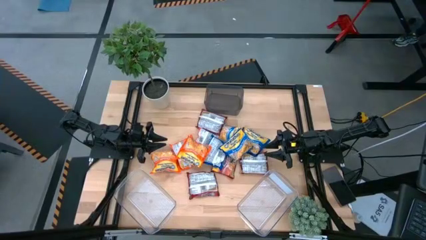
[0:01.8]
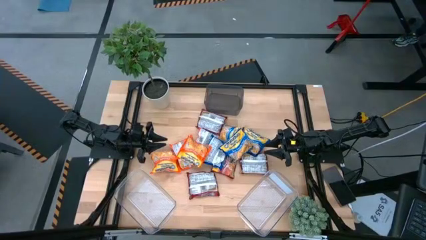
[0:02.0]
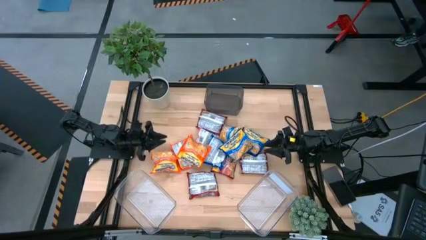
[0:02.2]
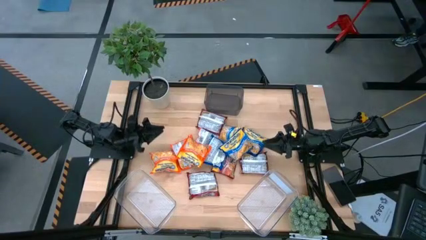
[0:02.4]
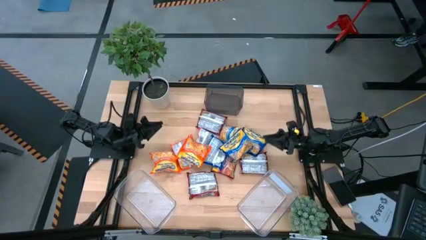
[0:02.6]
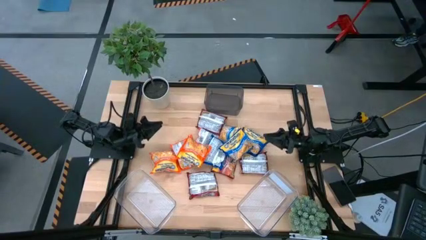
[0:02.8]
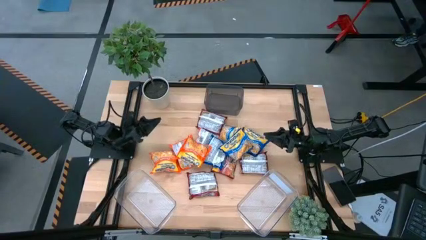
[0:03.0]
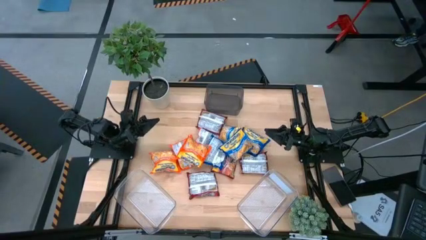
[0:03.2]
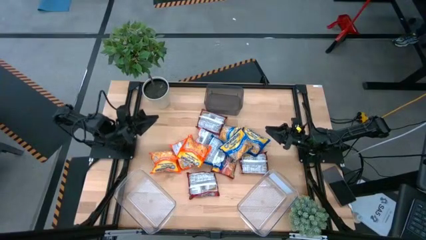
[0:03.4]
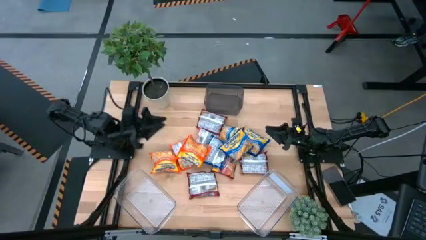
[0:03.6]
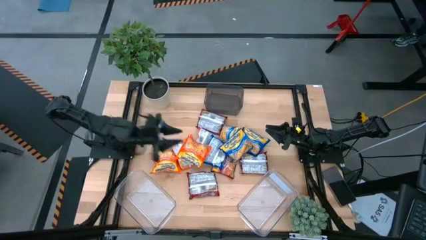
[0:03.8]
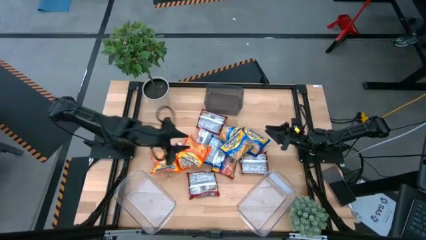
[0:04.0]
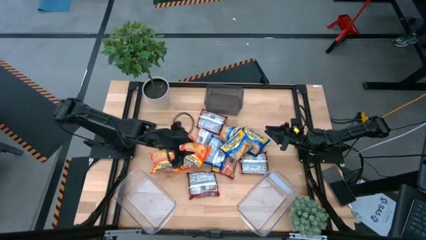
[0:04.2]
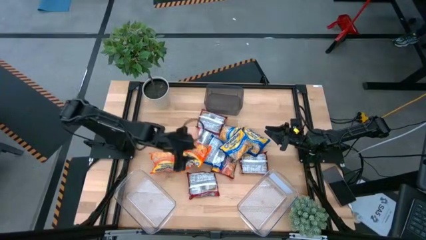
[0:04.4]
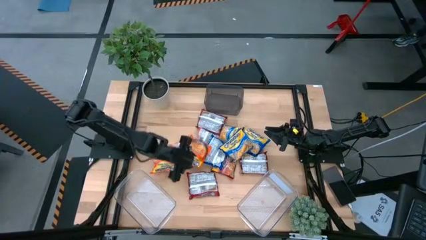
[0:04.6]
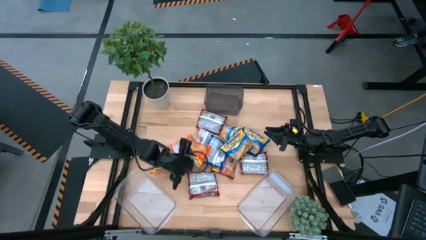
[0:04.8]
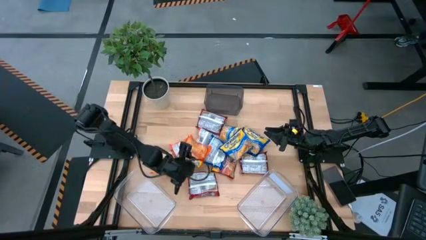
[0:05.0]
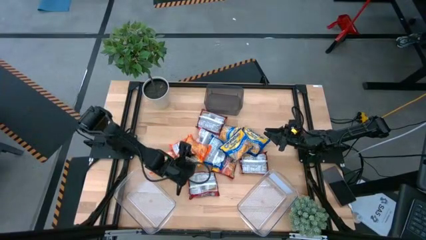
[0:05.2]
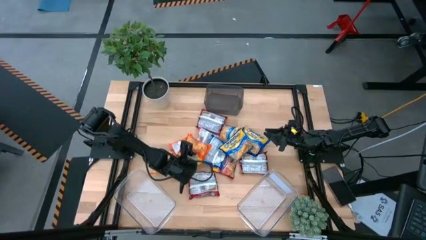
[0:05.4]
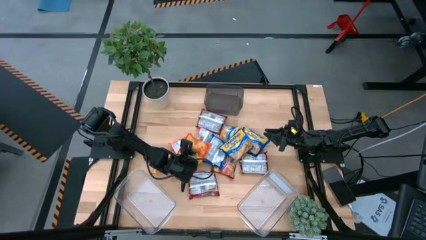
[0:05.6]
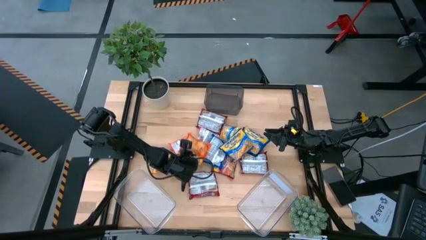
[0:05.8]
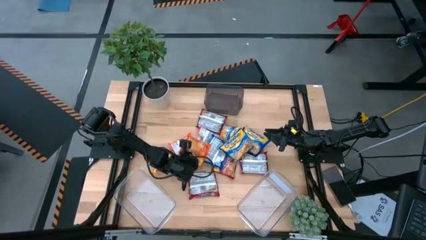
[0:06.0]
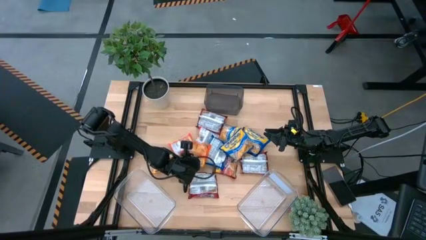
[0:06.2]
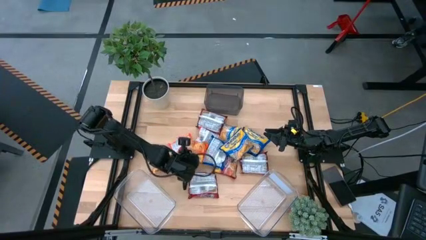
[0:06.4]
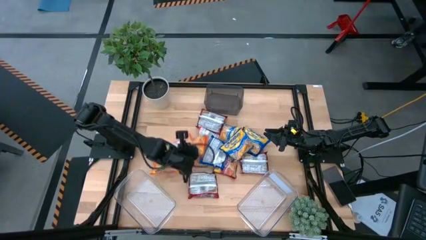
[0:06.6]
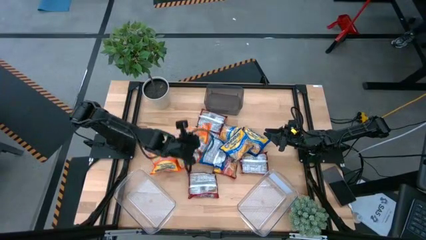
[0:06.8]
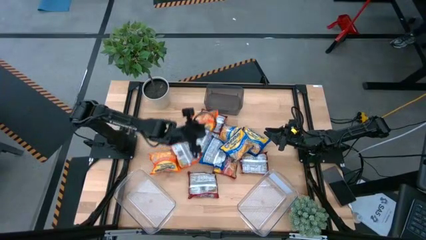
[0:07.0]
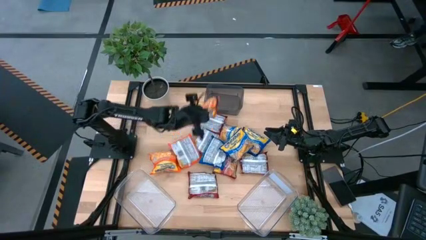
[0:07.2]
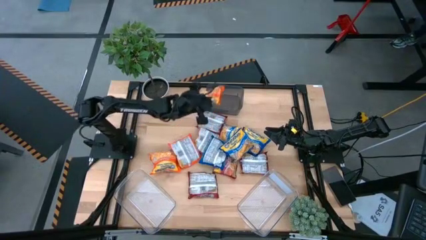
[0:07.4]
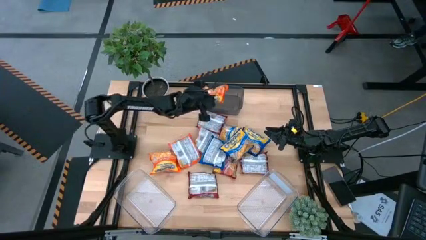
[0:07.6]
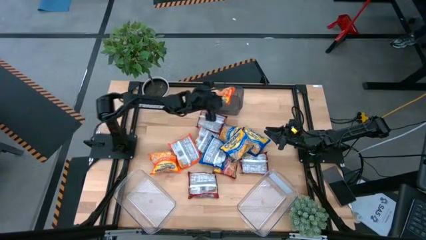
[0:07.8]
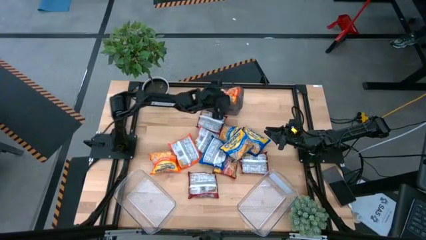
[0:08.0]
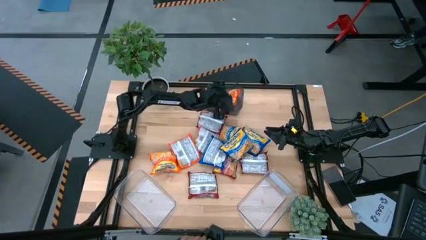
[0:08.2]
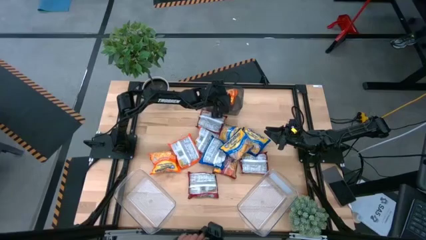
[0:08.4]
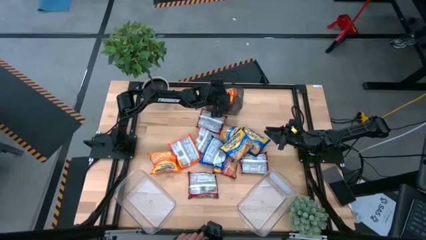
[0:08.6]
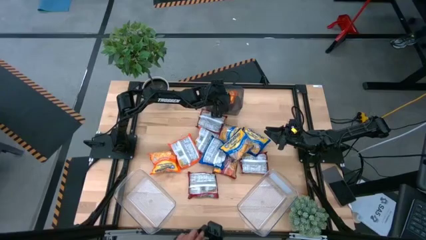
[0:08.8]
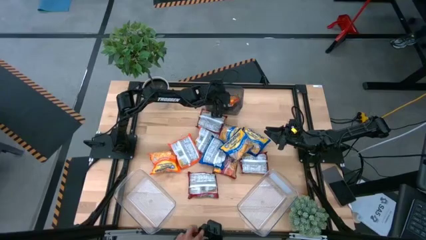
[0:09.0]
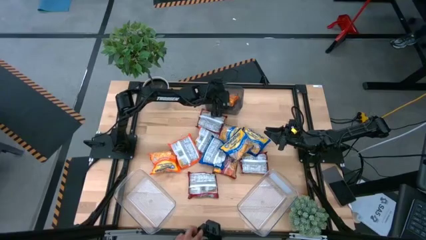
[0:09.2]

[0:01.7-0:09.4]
Task: Sort Maruchan noodles
Put the orange noodle pack into the black bin

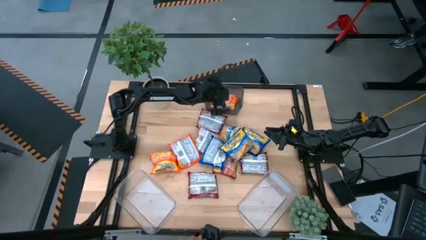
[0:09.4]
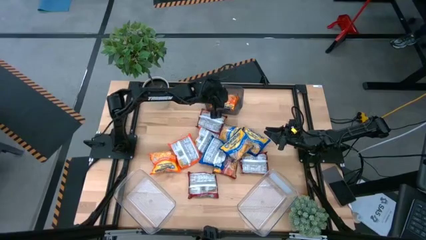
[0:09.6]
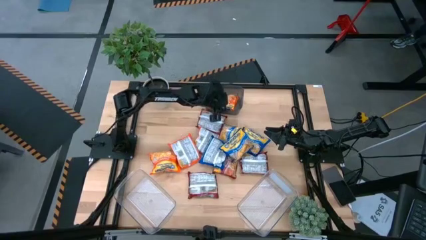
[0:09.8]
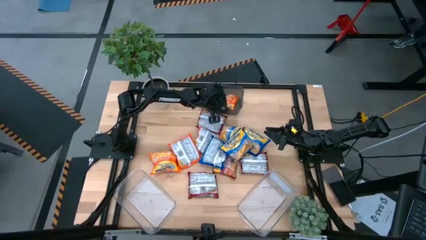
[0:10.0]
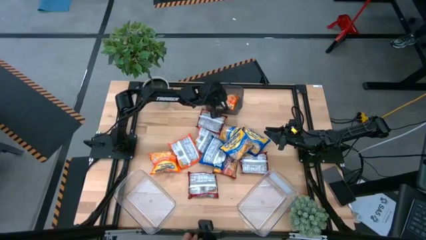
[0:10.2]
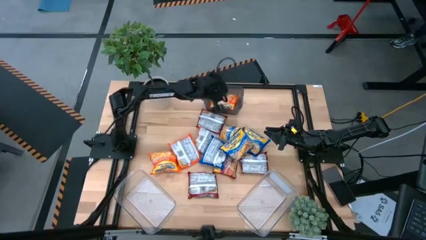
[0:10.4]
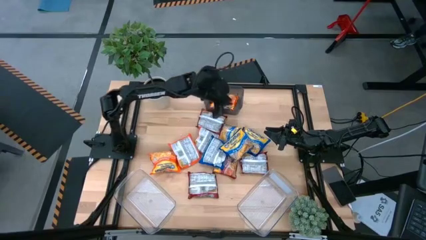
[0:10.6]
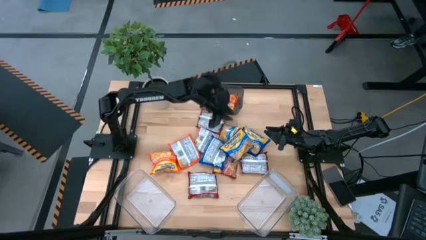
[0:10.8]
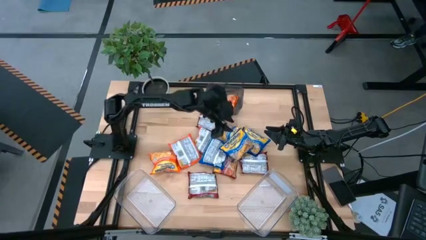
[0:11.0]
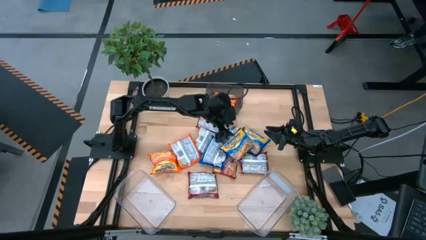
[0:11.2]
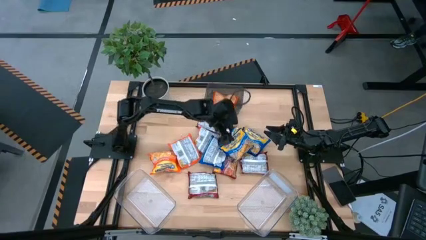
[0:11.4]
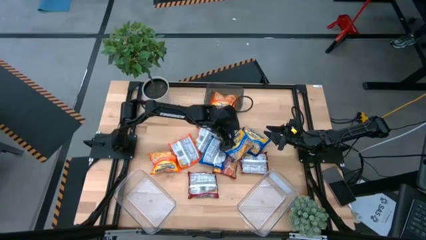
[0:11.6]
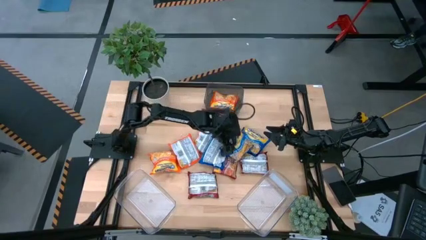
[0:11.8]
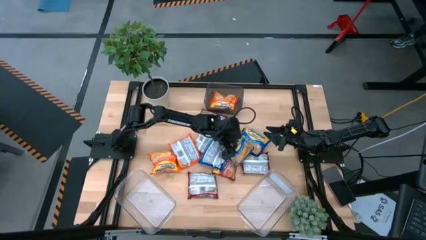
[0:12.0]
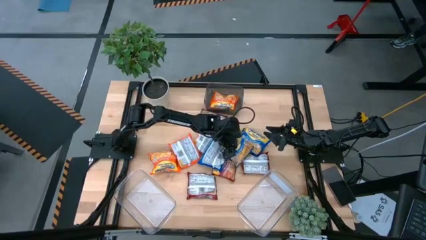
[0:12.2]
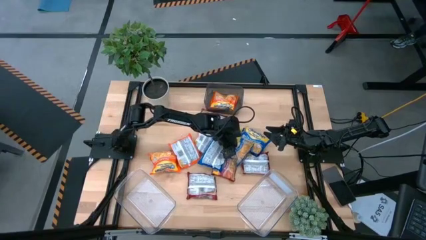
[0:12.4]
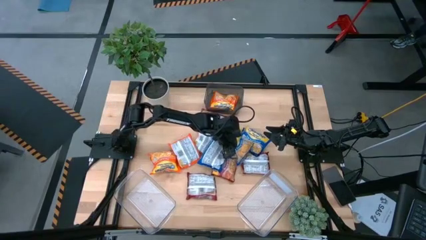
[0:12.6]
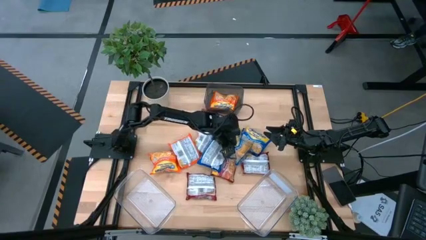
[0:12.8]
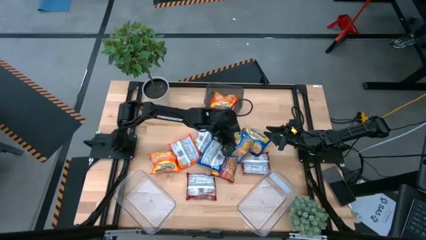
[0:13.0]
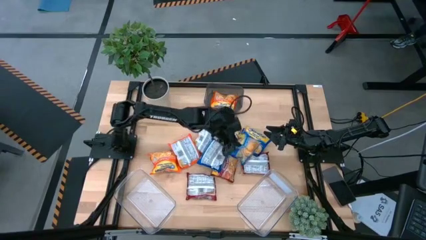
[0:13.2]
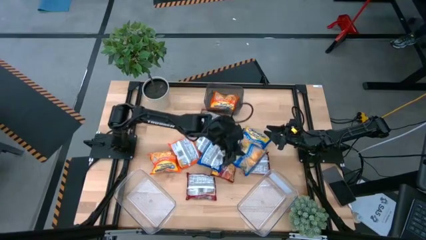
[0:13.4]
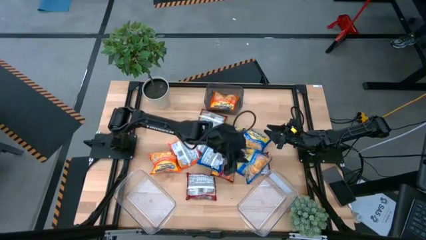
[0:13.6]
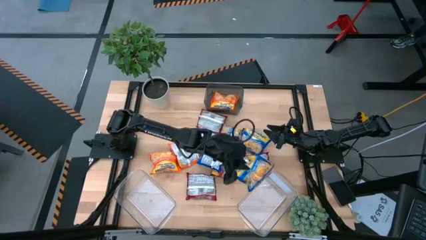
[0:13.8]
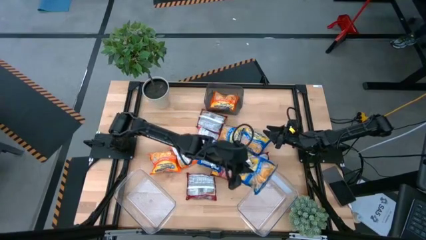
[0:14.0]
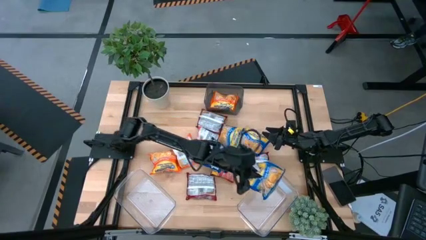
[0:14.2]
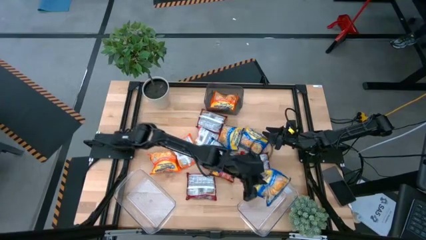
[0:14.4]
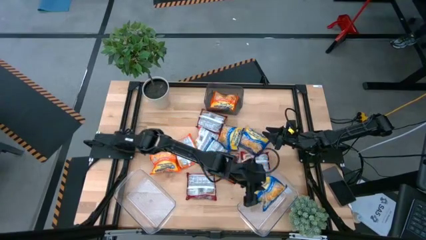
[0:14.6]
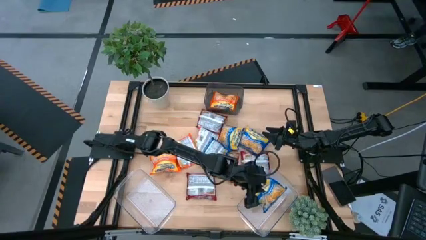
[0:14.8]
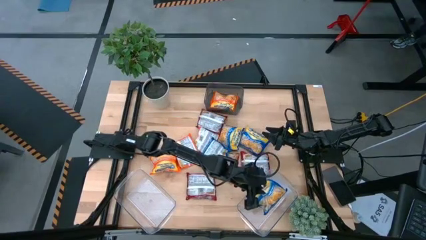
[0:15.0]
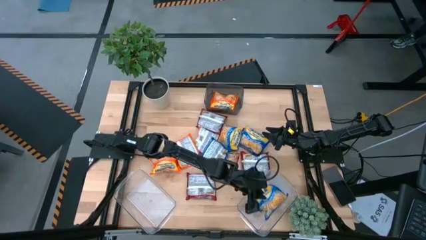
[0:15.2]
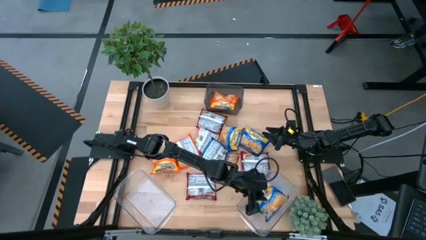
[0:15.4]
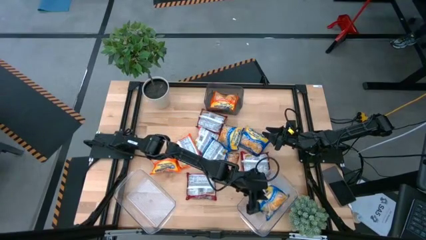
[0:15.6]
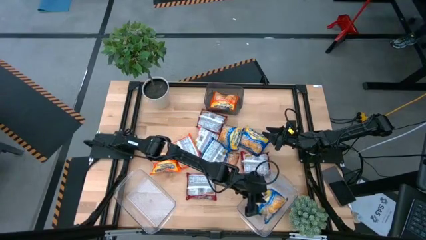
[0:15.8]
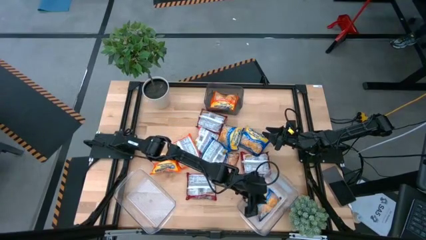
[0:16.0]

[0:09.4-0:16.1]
Put the blue noodle pack into the right transparent bin

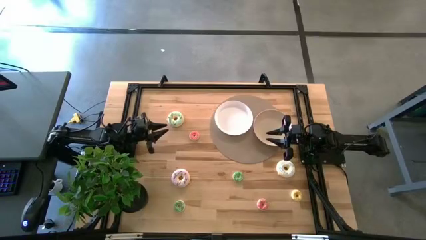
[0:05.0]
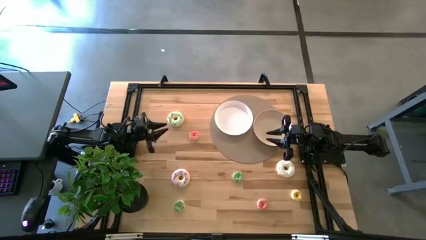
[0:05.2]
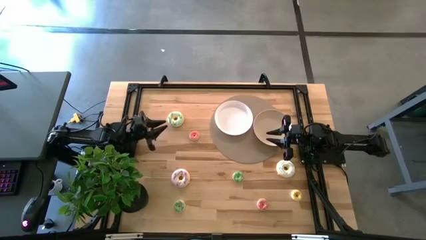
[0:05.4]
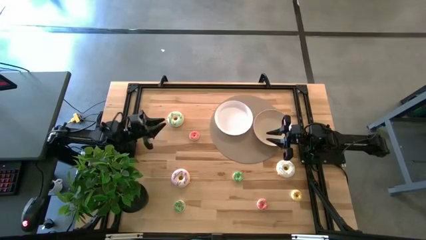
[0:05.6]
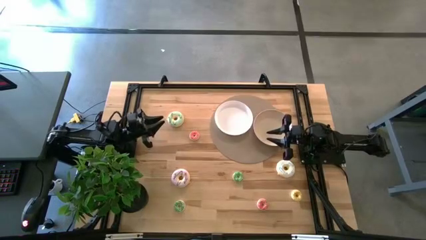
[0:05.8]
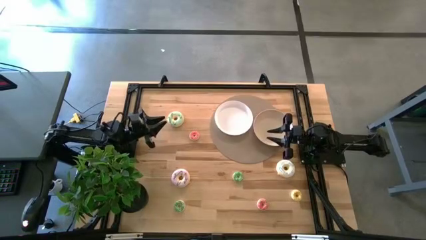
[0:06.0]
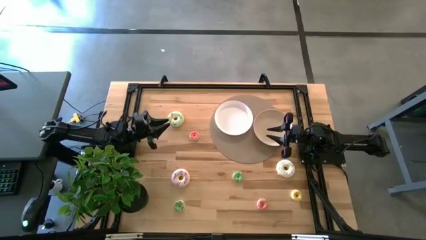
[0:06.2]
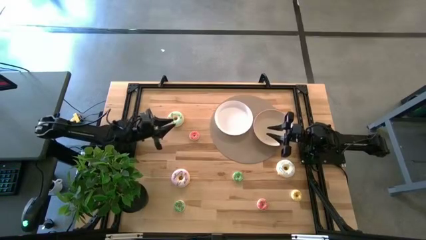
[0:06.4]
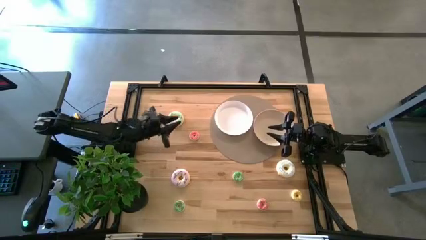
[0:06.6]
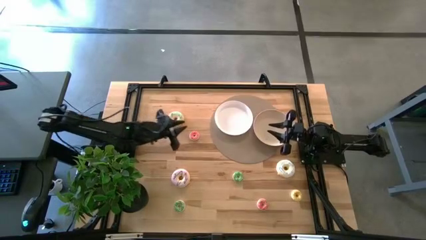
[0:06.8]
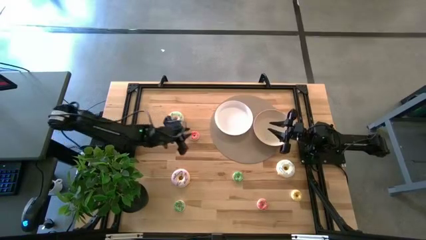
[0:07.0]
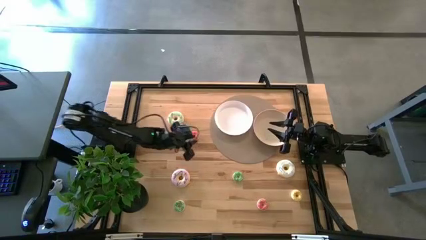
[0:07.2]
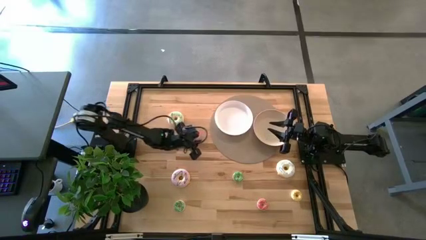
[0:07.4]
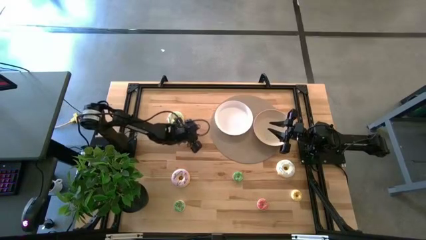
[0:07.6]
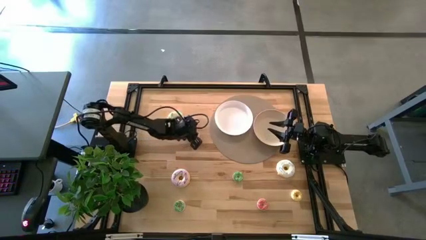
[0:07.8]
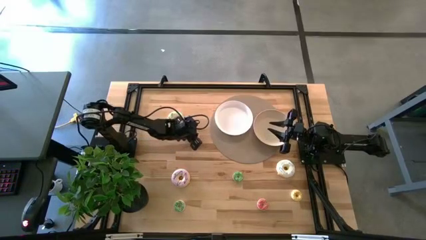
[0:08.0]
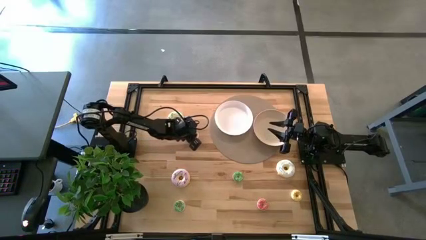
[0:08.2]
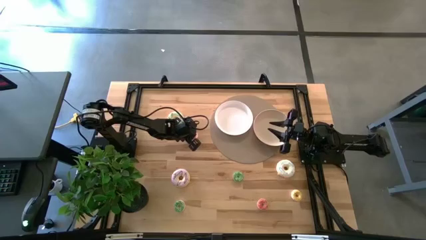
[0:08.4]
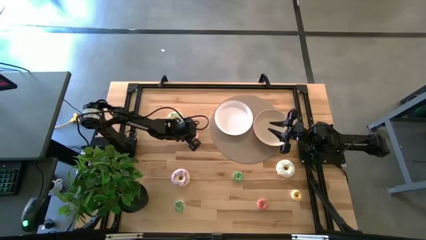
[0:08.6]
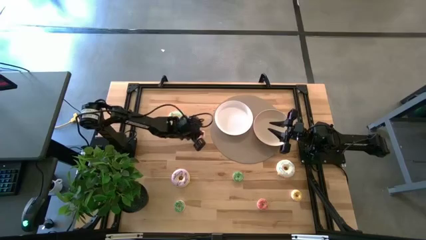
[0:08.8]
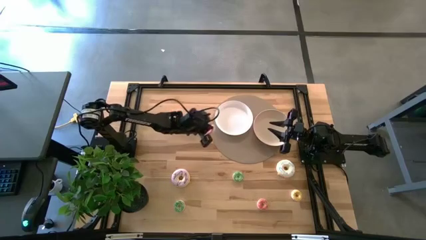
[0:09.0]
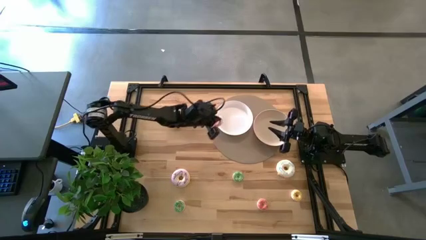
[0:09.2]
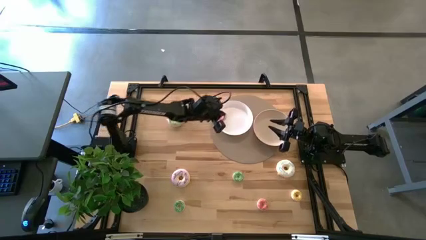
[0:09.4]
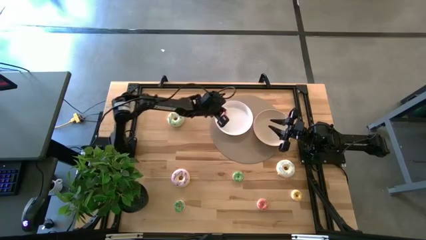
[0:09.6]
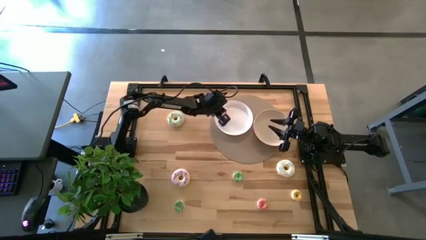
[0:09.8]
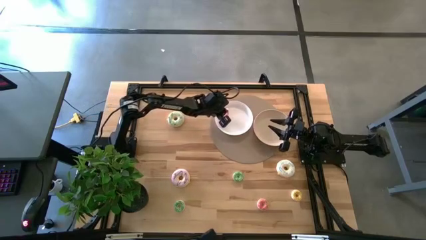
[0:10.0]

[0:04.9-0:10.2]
Task: Pick & Place donuts
Put the top small red donut on the white plate
